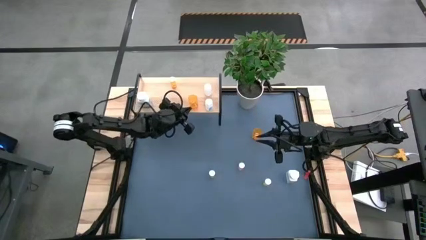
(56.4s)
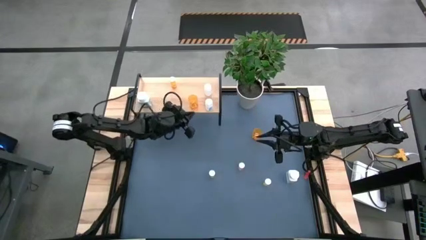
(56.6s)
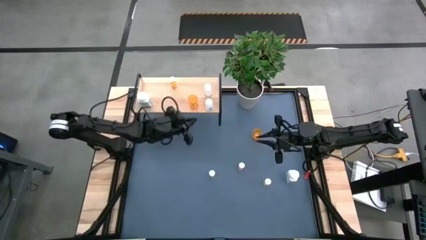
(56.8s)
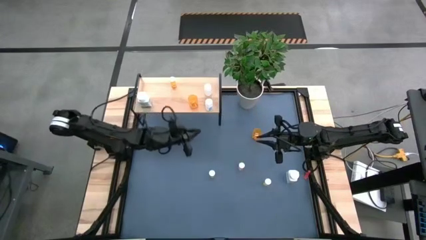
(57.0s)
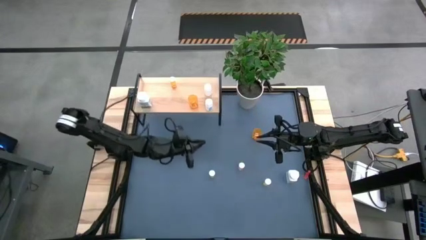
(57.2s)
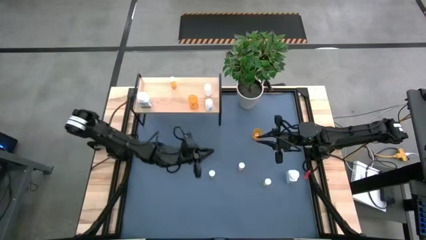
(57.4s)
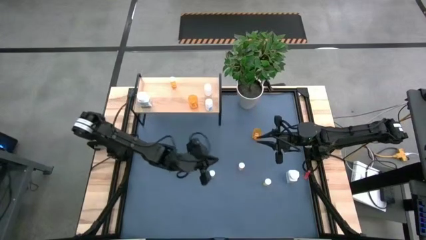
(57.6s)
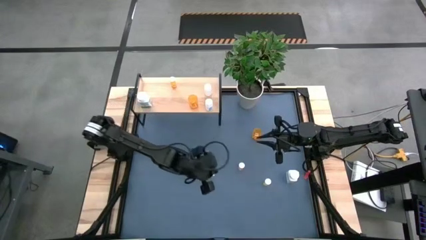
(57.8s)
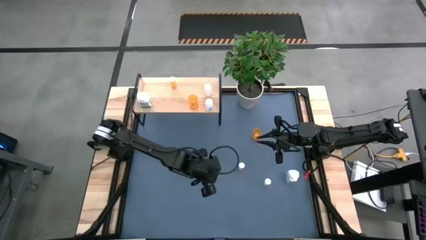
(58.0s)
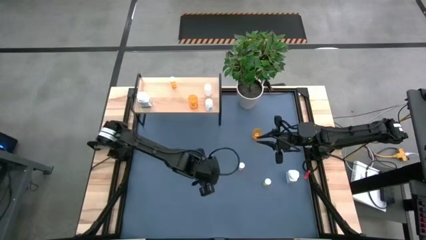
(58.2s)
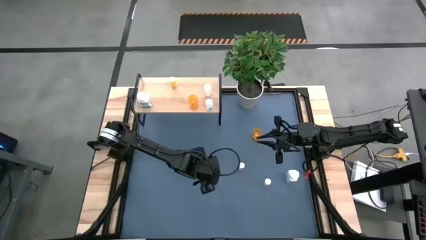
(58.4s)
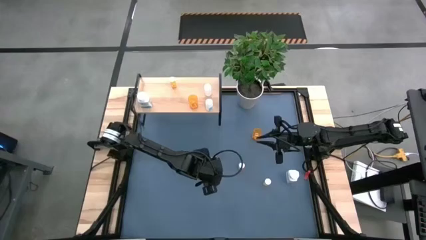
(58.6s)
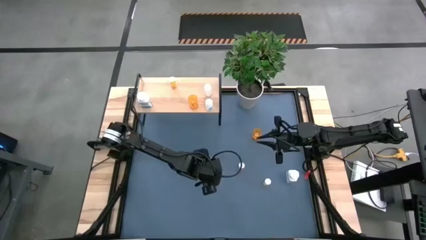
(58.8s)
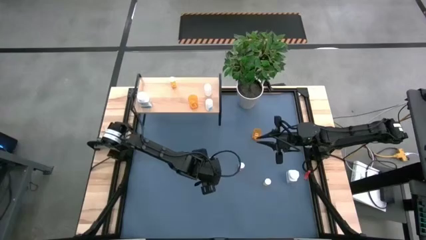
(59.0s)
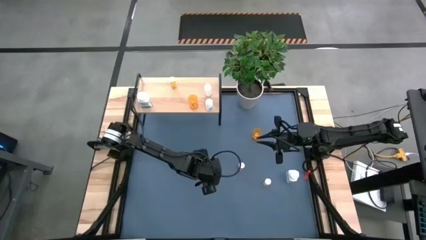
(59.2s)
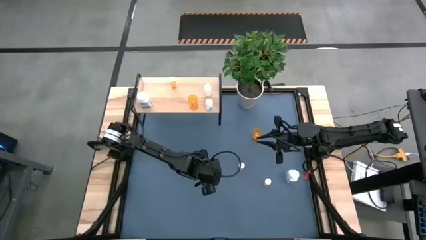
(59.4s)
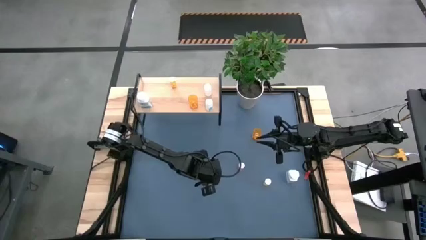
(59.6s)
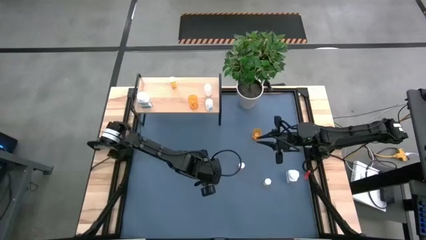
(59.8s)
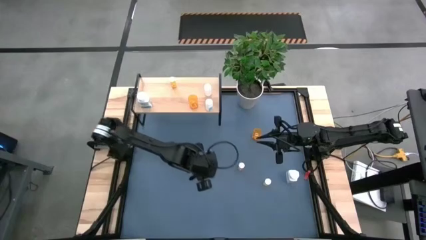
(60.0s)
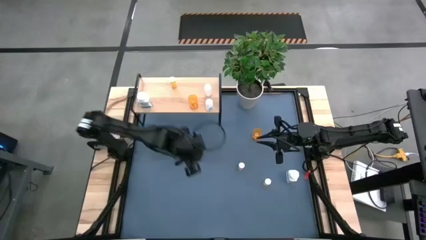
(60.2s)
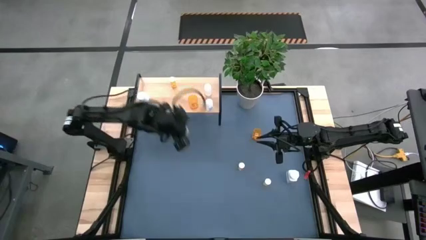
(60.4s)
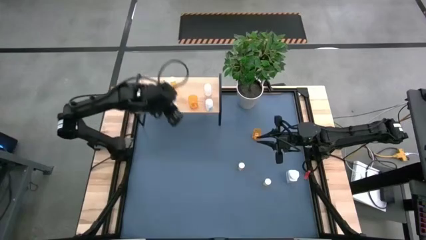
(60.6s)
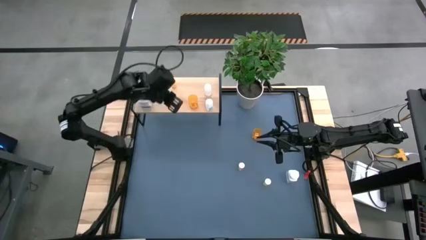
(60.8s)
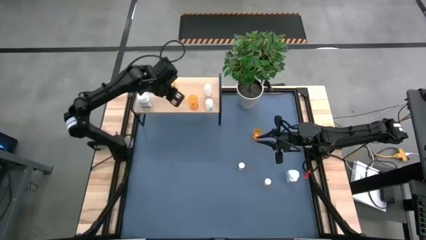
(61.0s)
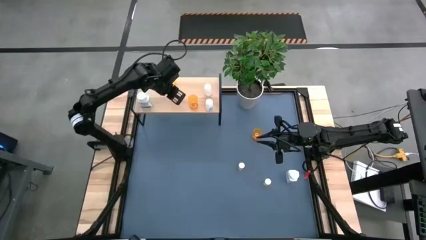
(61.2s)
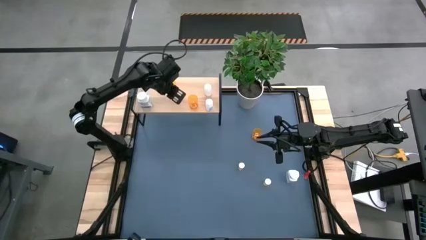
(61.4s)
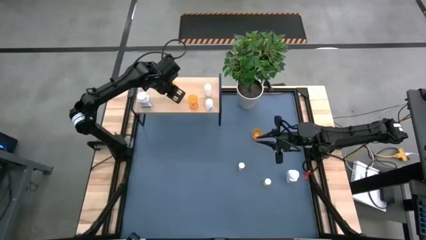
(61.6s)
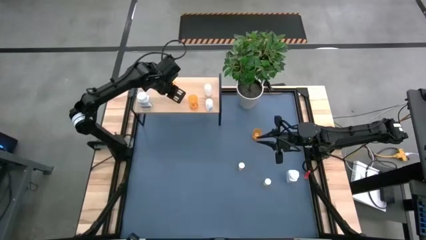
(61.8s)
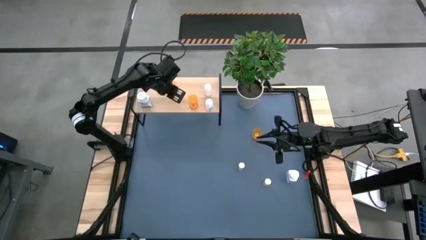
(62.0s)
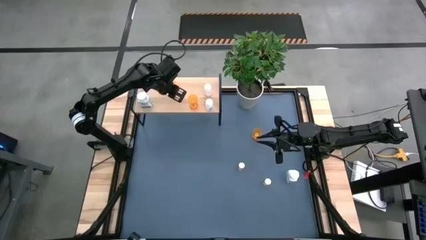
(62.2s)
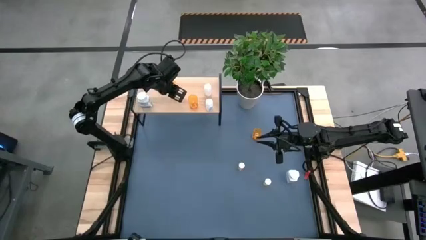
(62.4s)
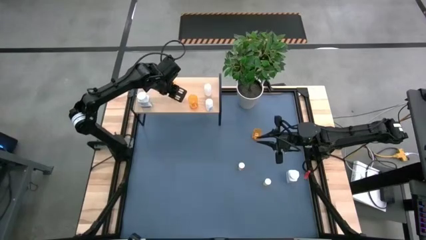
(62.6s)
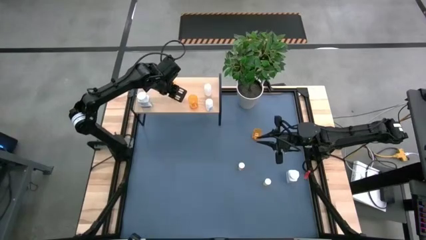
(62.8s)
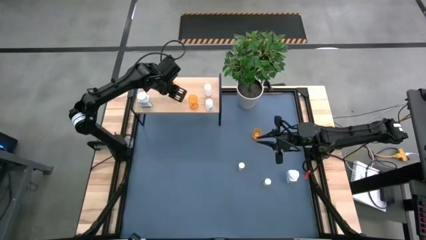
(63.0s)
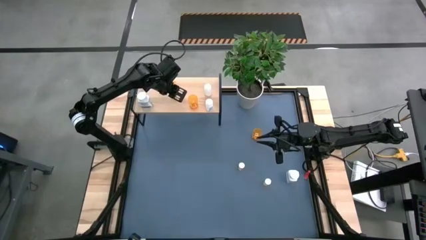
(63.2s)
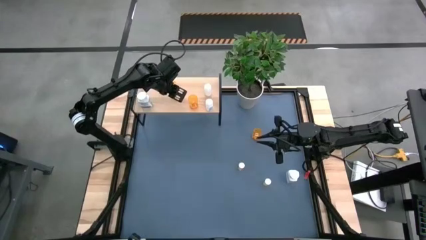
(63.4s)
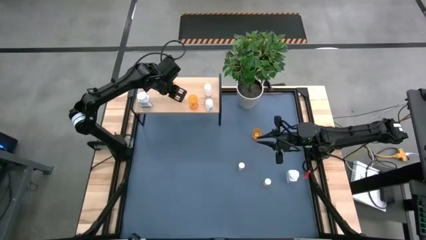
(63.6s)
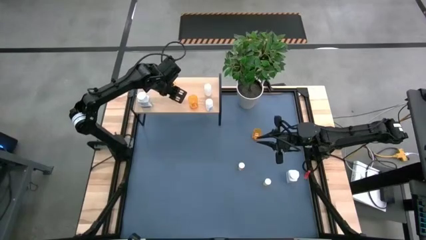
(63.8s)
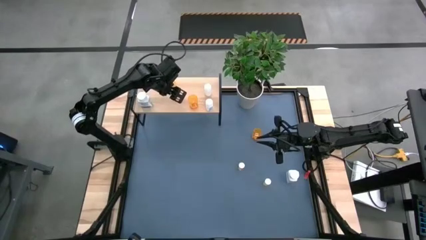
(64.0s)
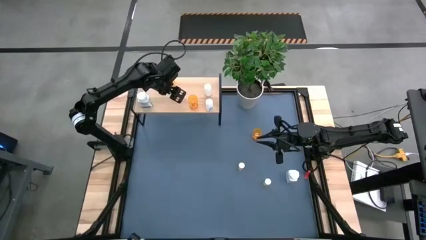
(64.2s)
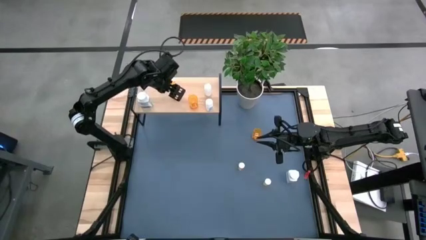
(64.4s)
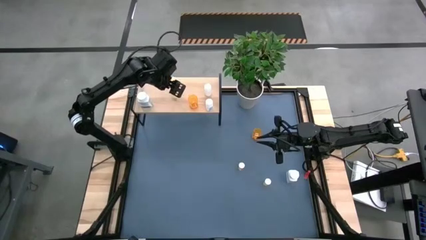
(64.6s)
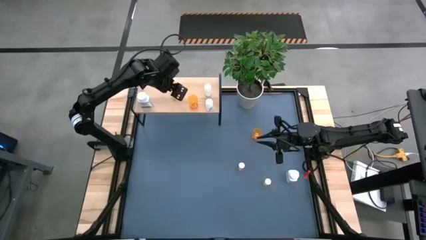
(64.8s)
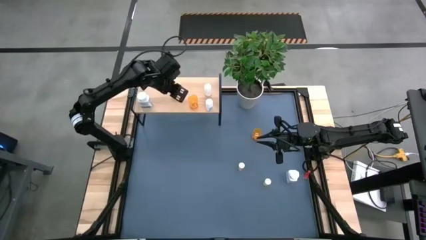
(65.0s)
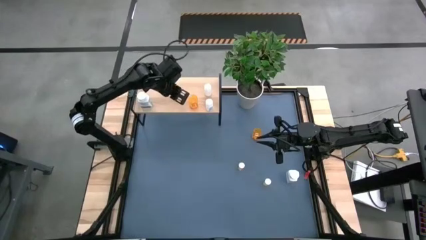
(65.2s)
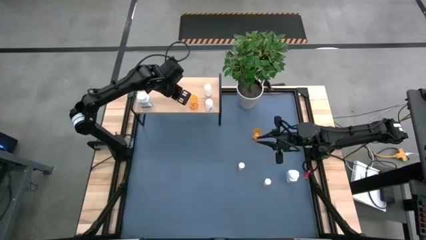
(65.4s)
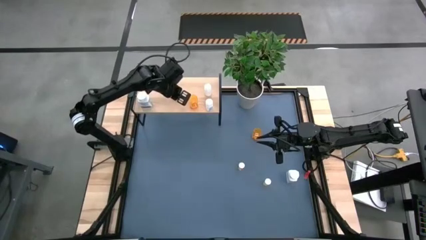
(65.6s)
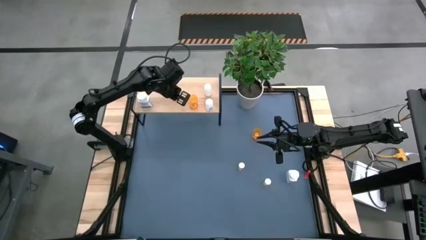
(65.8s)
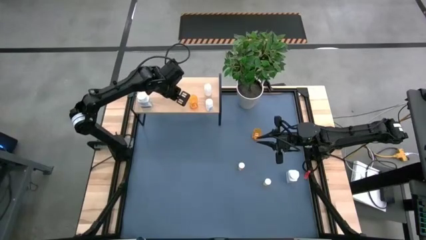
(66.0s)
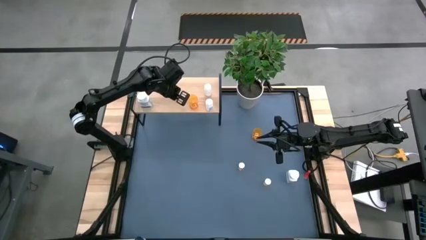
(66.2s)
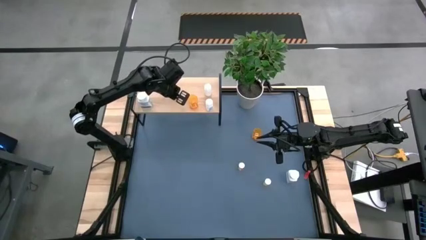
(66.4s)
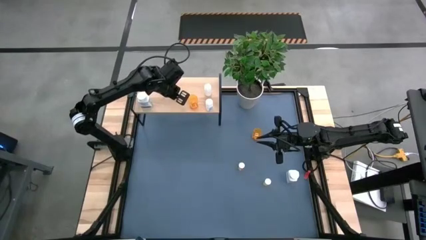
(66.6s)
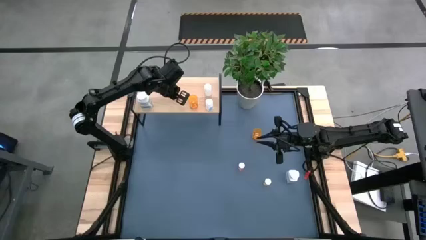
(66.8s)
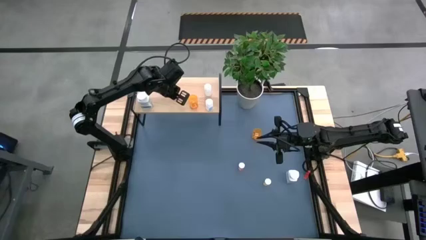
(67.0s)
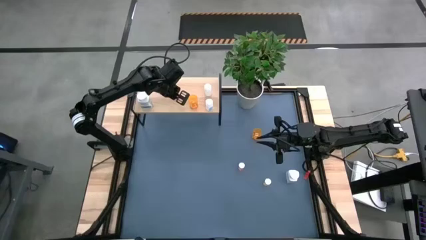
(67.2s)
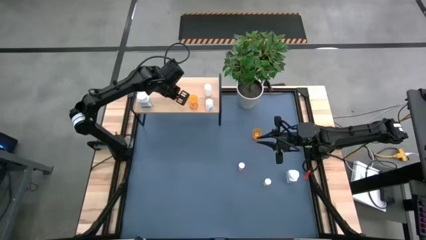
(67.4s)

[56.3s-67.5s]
Task: Pick and place medicine bottles onto shelf by color
Put the left yellow pill bottle on the shelf

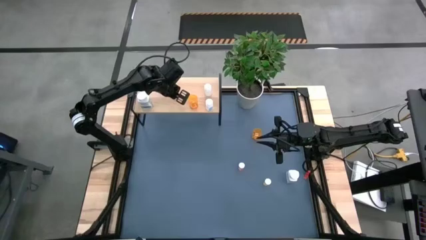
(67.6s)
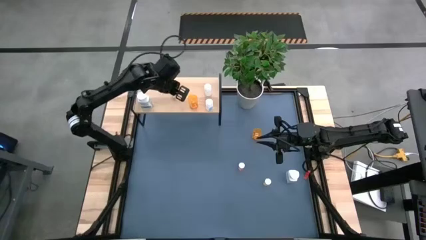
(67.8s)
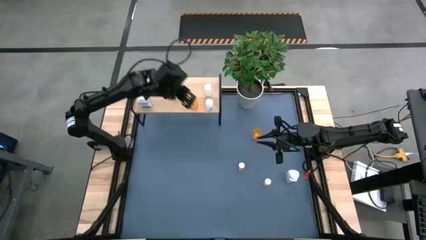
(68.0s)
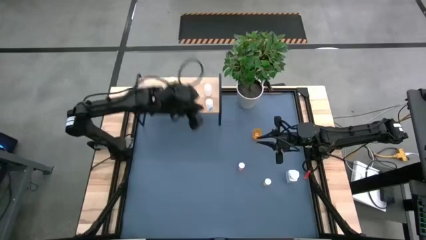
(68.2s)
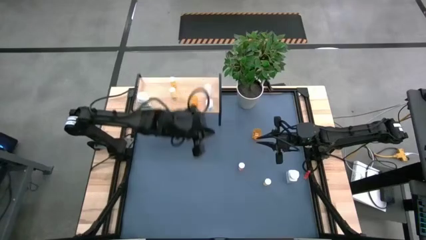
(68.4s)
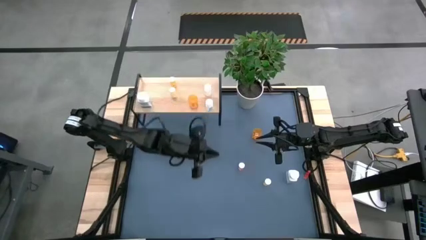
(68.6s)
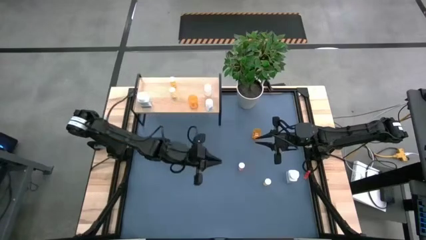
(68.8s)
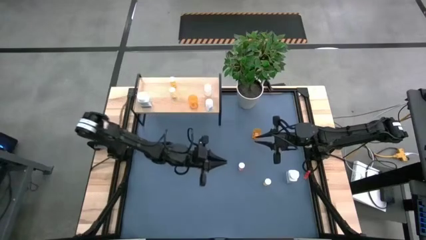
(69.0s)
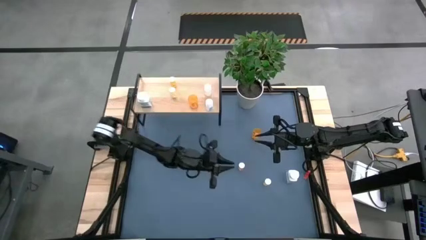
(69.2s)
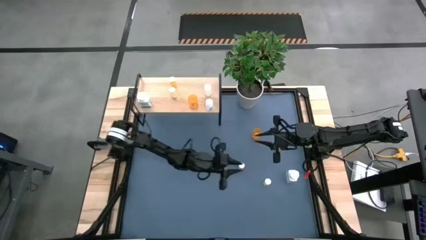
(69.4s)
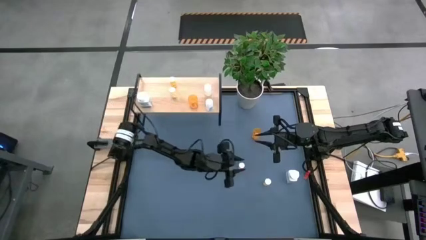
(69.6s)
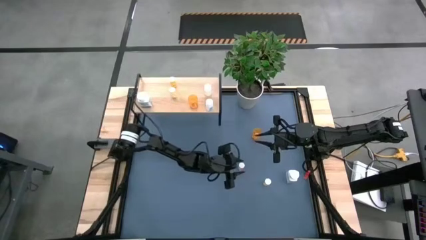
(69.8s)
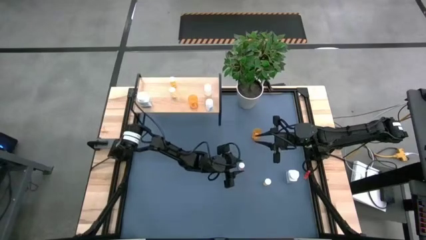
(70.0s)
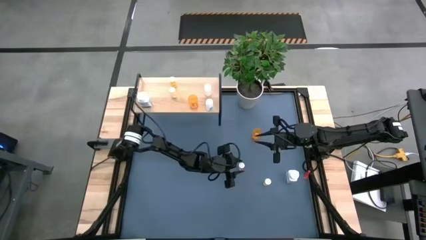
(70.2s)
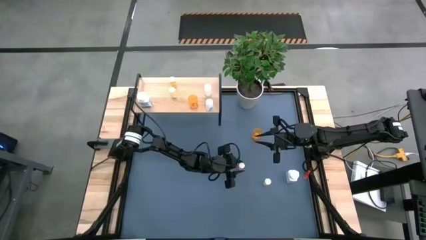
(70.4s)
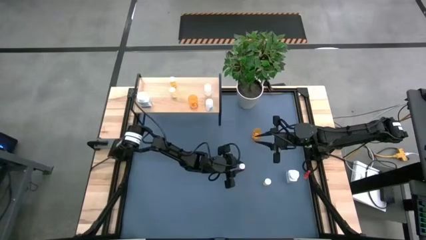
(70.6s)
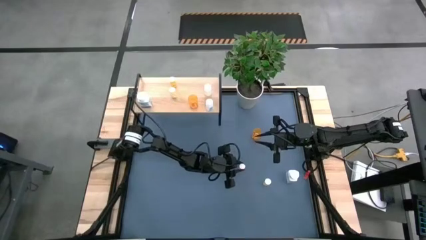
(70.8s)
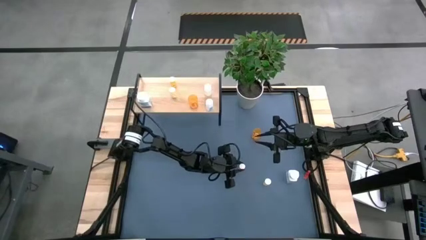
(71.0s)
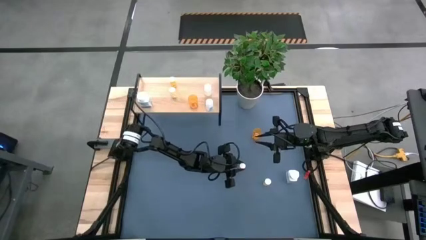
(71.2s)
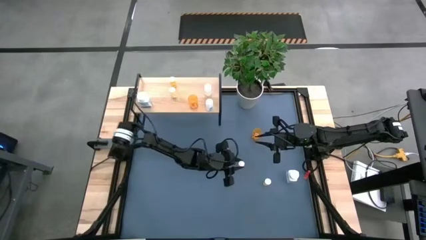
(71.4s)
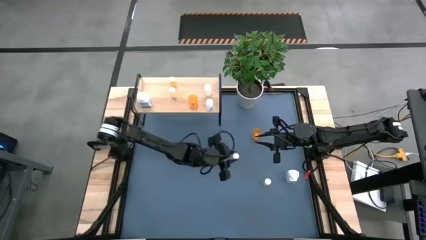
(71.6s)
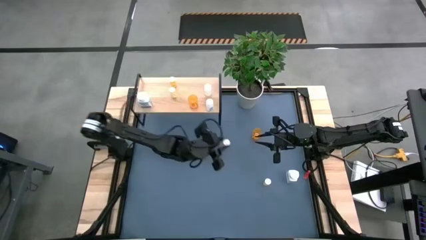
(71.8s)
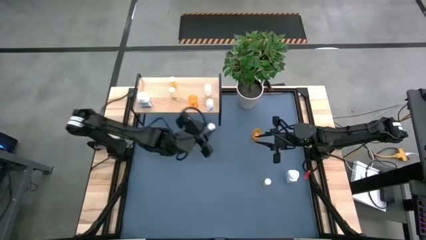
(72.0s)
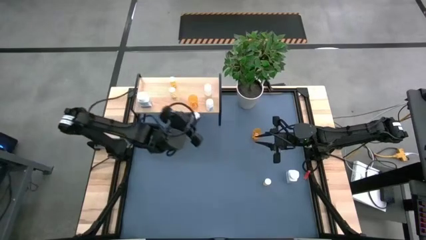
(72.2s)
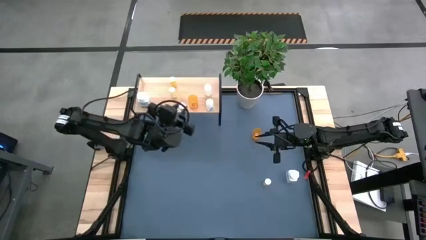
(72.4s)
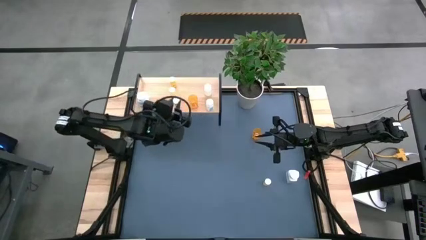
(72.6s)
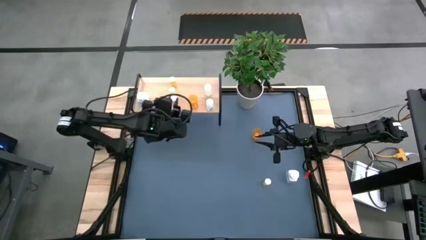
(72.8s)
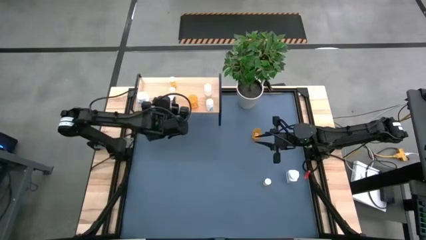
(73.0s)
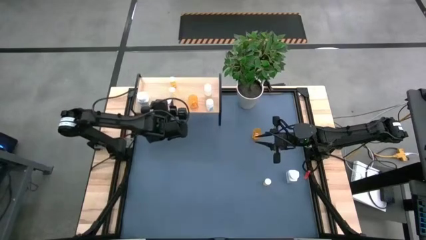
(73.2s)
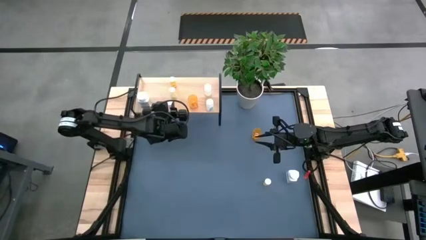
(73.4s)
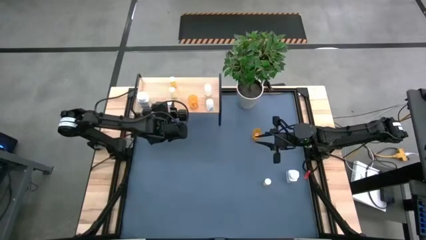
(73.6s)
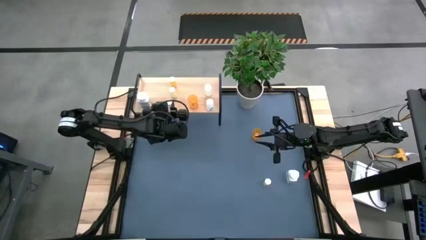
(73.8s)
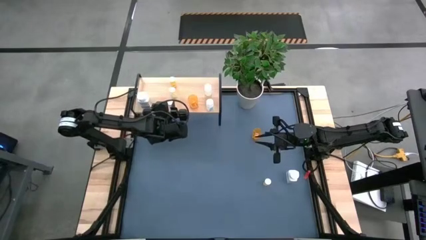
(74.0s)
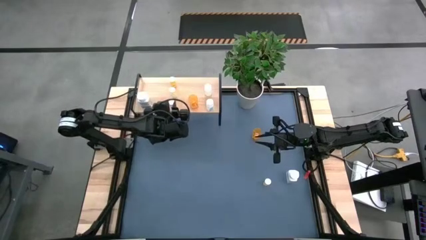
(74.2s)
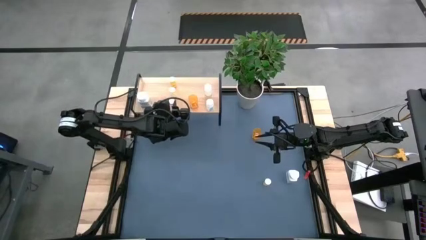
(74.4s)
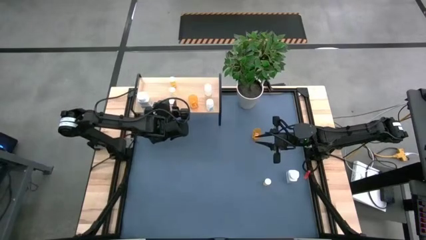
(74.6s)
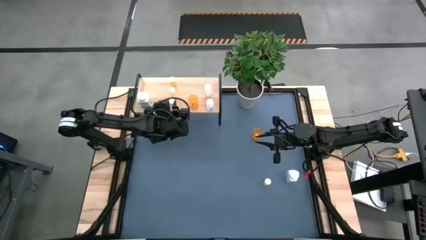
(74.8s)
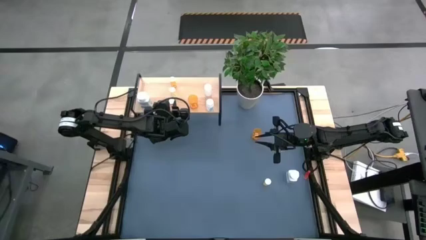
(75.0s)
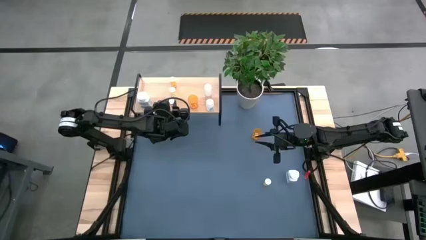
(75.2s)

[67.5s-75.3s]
Put the pink pill bottle on the shelf
